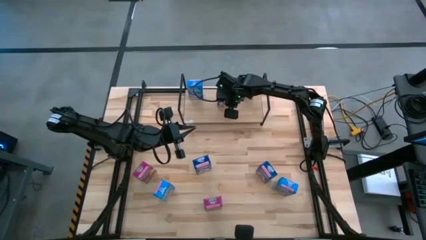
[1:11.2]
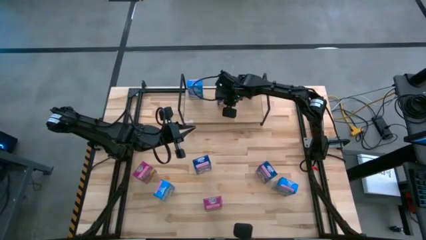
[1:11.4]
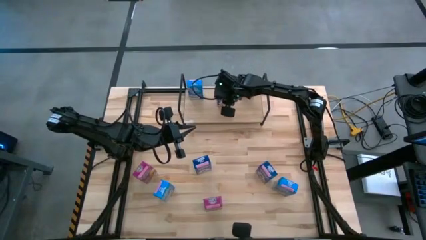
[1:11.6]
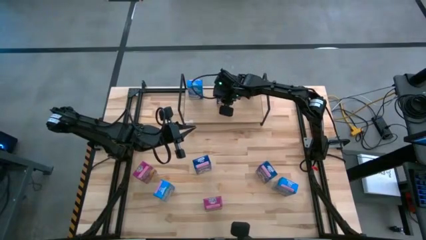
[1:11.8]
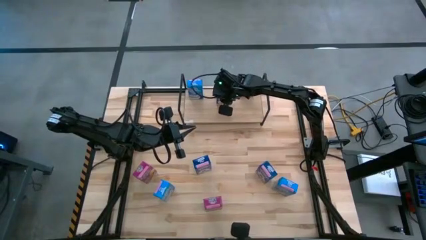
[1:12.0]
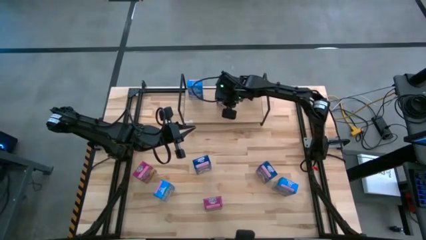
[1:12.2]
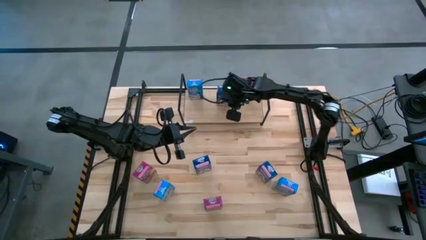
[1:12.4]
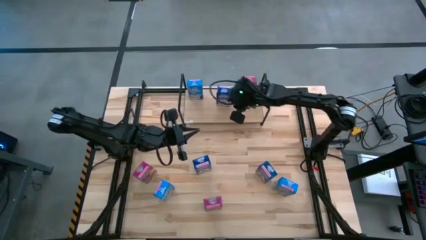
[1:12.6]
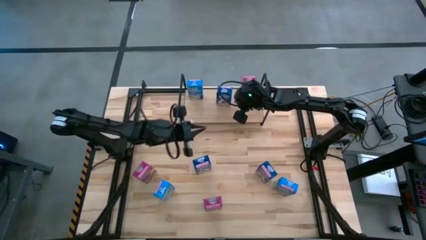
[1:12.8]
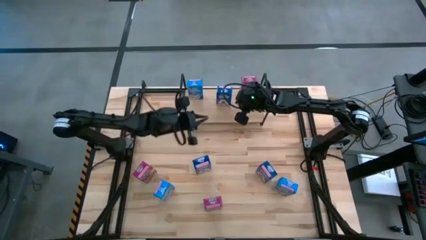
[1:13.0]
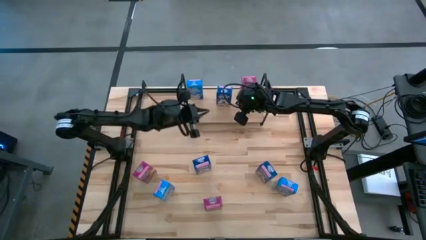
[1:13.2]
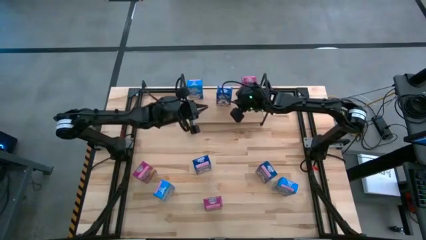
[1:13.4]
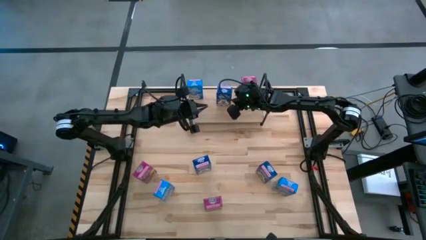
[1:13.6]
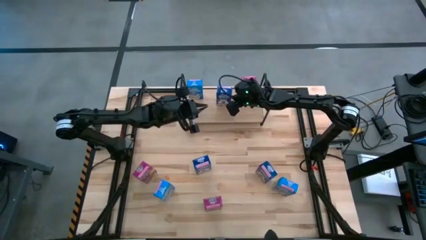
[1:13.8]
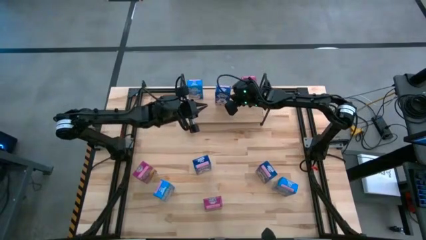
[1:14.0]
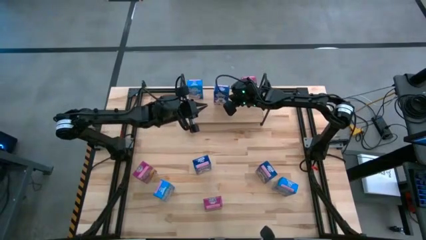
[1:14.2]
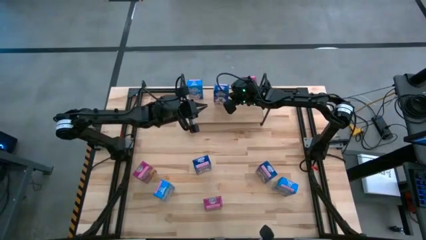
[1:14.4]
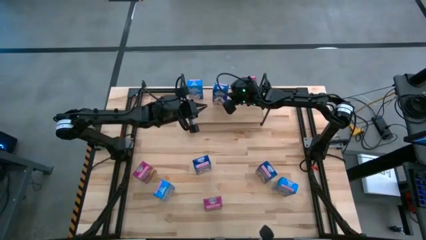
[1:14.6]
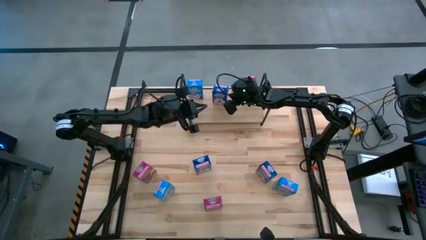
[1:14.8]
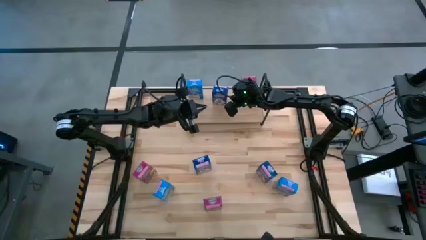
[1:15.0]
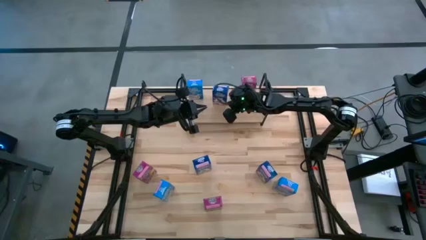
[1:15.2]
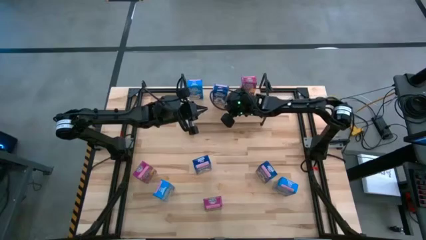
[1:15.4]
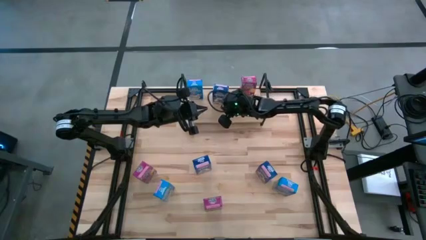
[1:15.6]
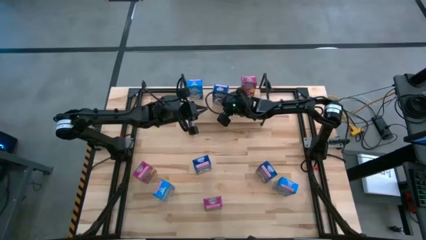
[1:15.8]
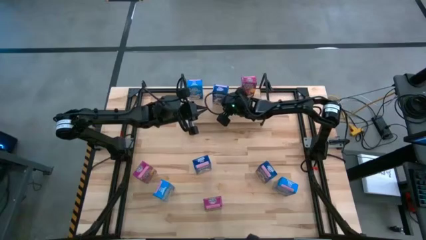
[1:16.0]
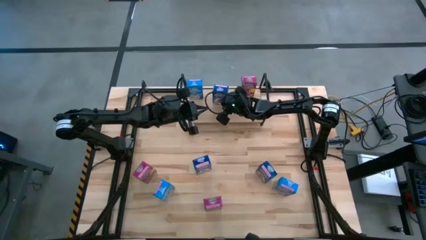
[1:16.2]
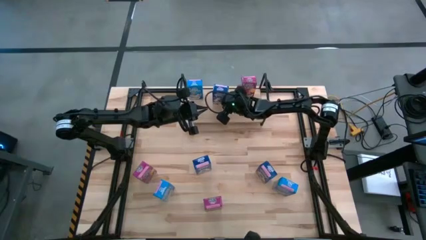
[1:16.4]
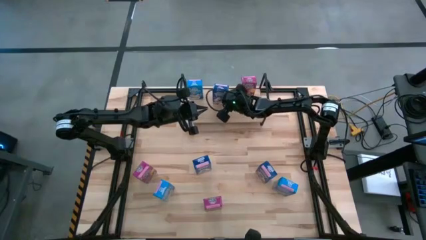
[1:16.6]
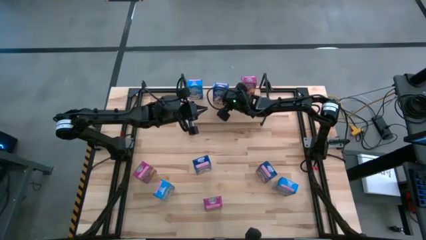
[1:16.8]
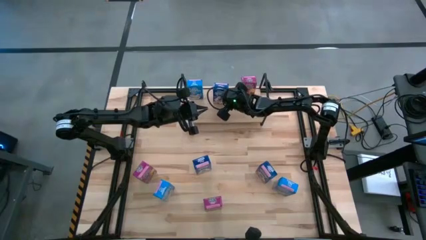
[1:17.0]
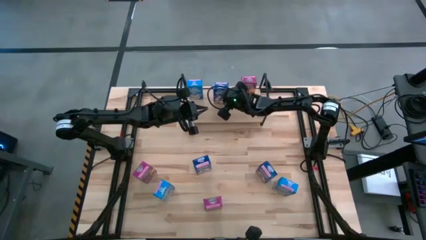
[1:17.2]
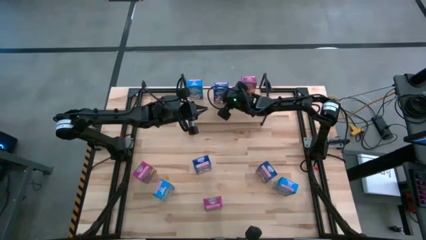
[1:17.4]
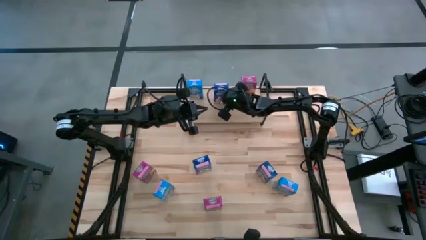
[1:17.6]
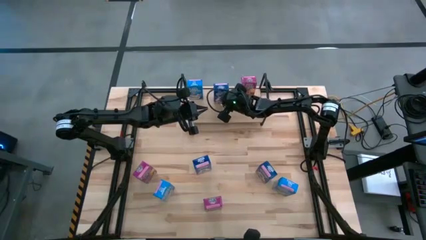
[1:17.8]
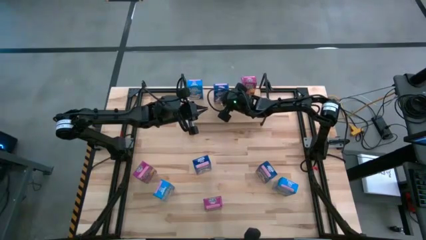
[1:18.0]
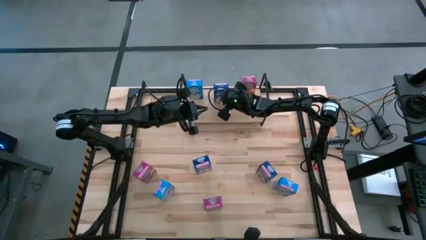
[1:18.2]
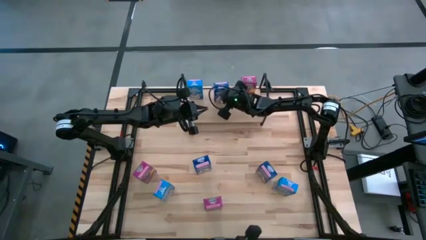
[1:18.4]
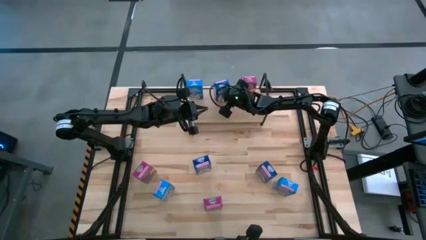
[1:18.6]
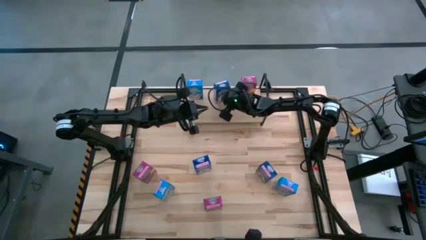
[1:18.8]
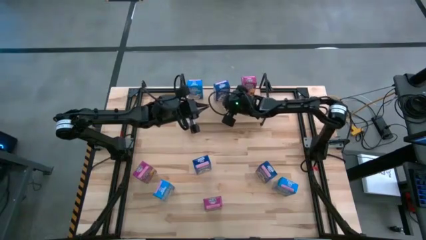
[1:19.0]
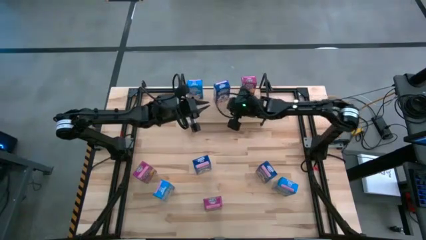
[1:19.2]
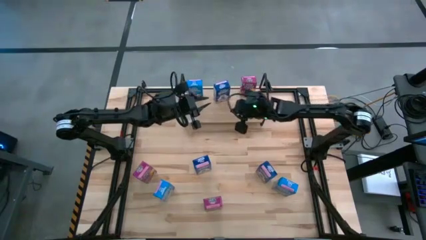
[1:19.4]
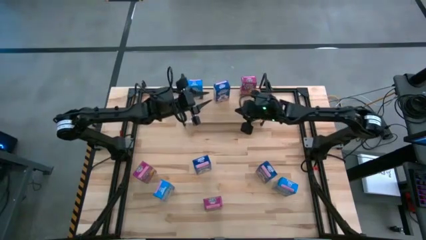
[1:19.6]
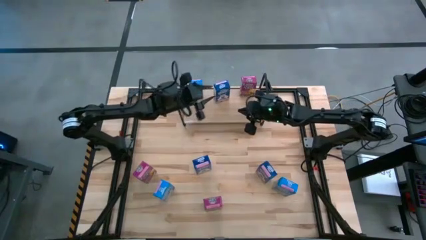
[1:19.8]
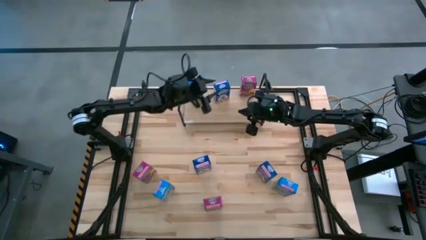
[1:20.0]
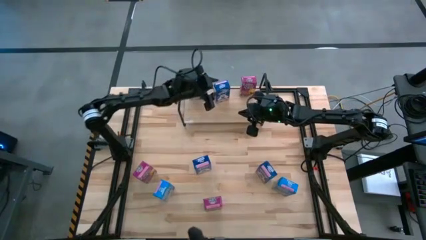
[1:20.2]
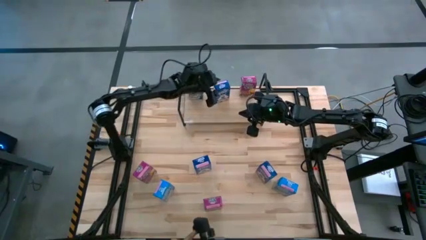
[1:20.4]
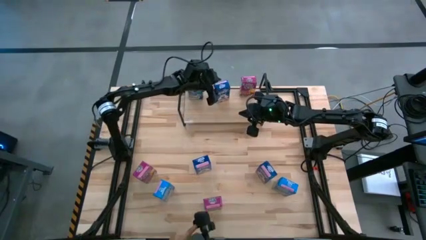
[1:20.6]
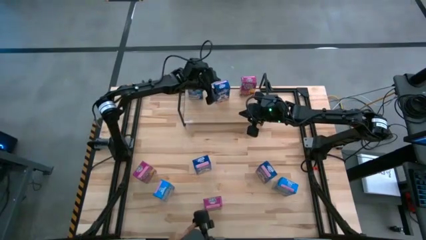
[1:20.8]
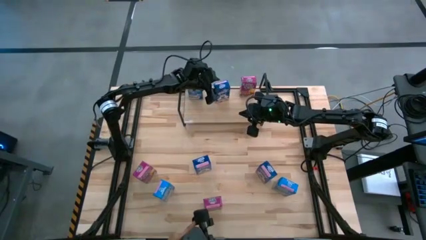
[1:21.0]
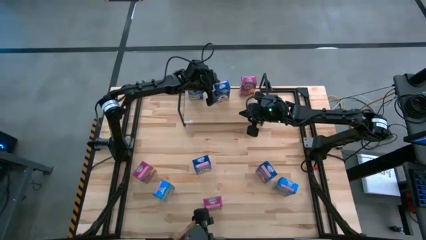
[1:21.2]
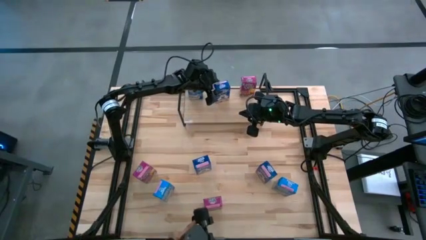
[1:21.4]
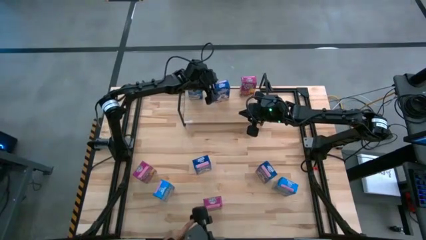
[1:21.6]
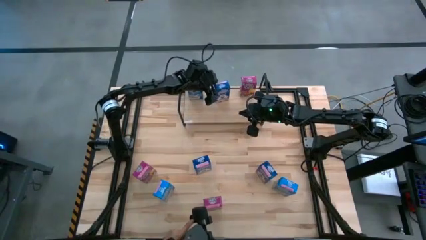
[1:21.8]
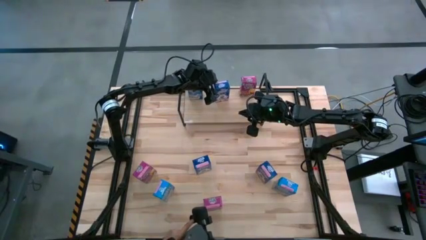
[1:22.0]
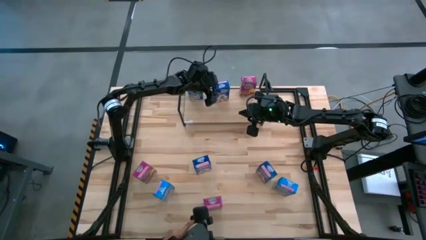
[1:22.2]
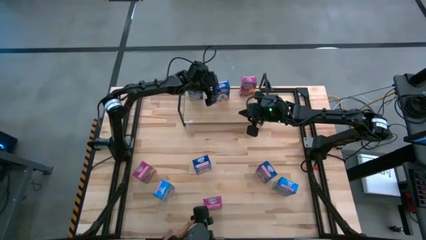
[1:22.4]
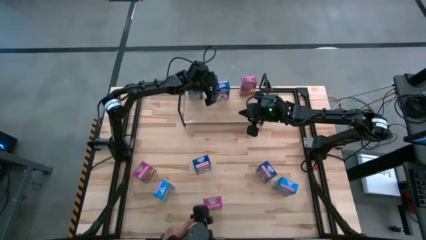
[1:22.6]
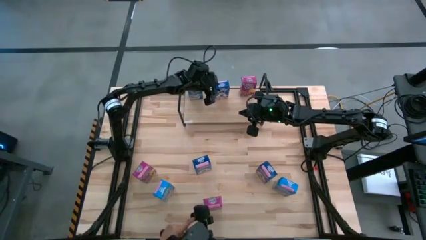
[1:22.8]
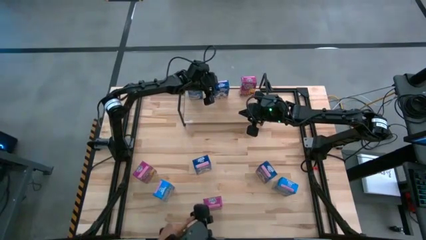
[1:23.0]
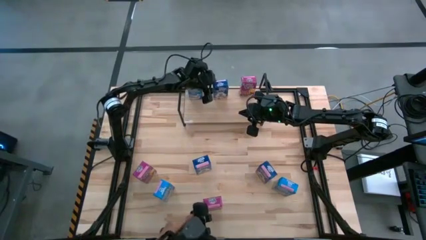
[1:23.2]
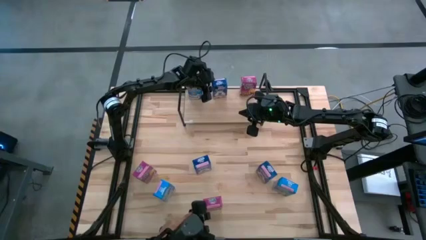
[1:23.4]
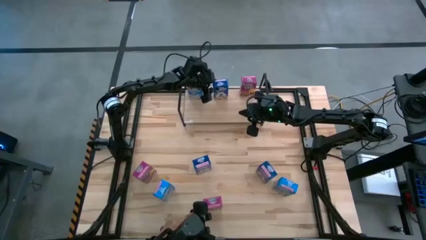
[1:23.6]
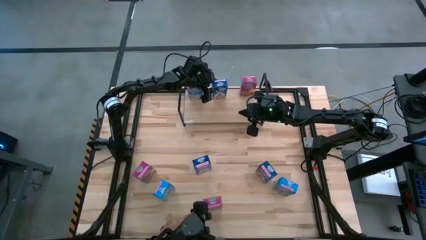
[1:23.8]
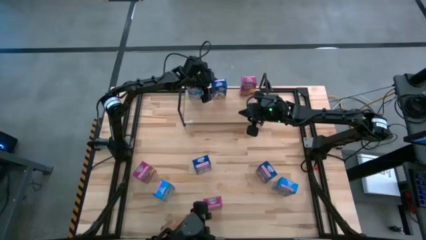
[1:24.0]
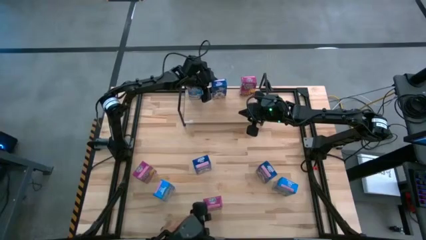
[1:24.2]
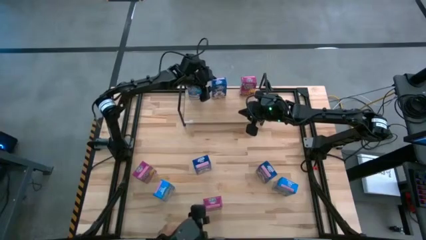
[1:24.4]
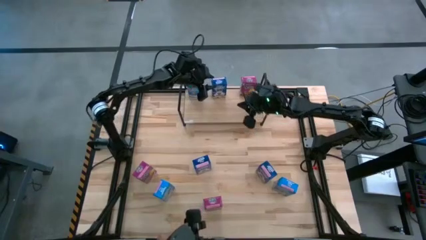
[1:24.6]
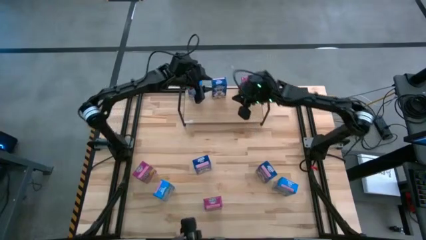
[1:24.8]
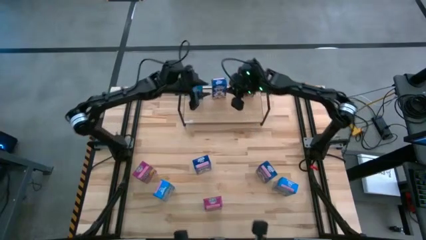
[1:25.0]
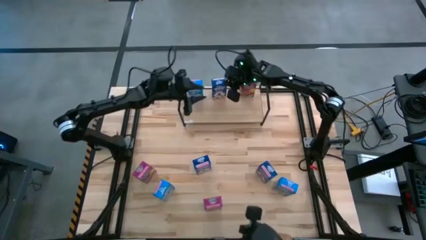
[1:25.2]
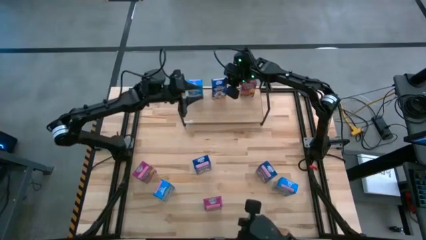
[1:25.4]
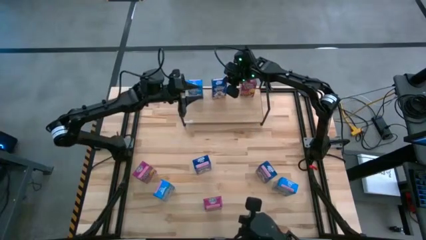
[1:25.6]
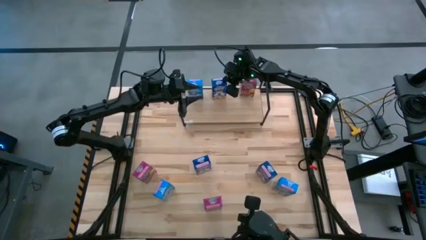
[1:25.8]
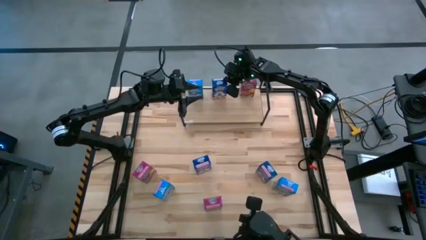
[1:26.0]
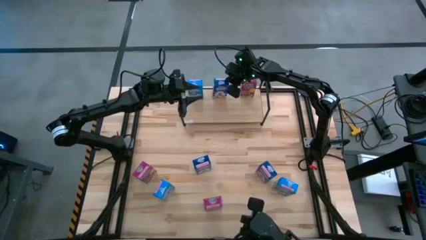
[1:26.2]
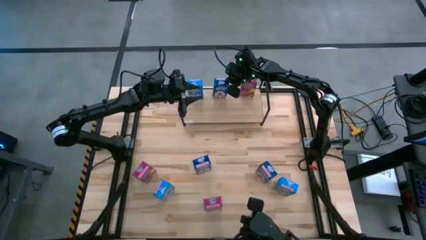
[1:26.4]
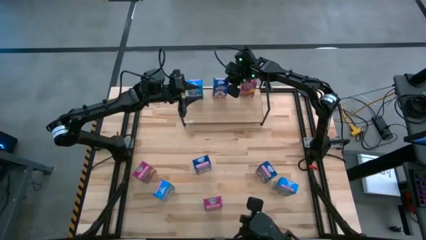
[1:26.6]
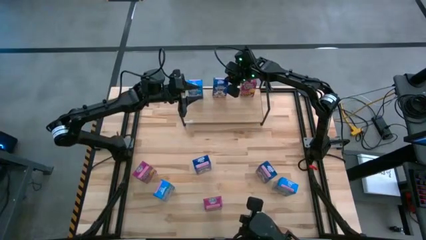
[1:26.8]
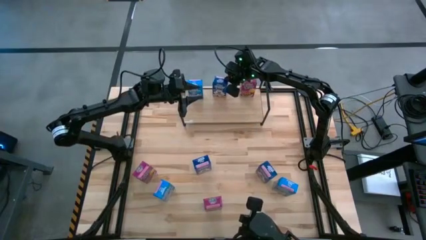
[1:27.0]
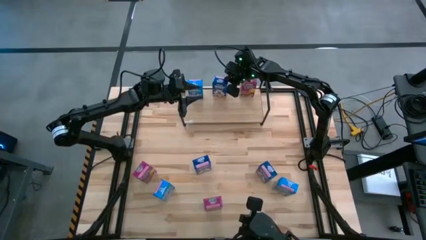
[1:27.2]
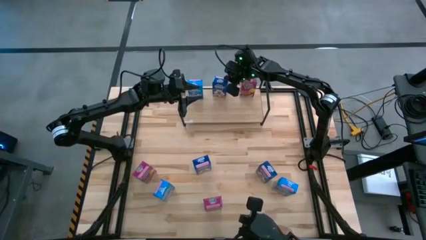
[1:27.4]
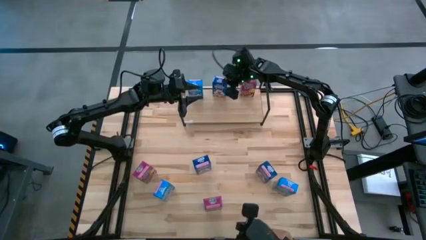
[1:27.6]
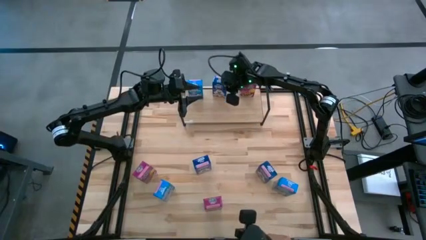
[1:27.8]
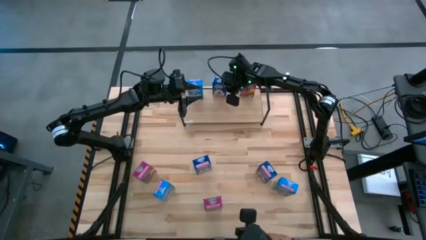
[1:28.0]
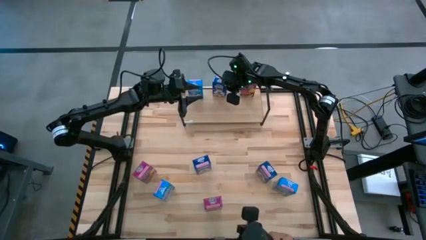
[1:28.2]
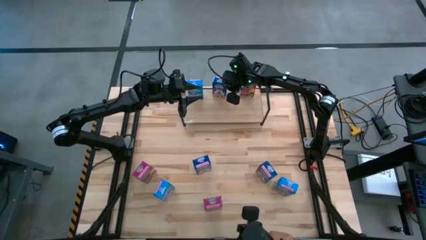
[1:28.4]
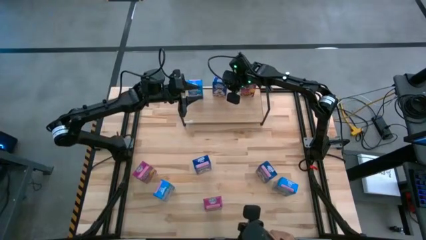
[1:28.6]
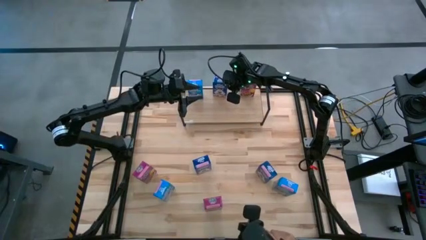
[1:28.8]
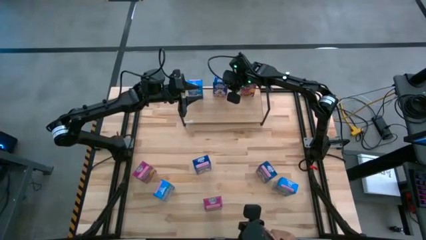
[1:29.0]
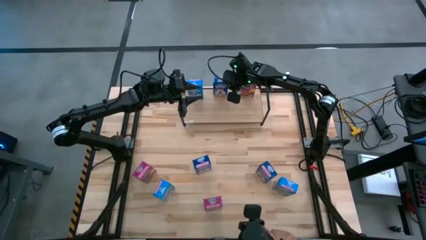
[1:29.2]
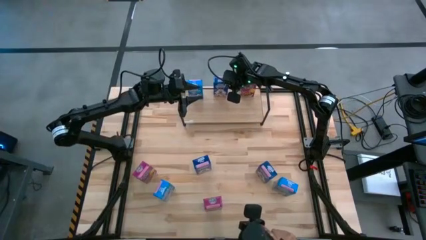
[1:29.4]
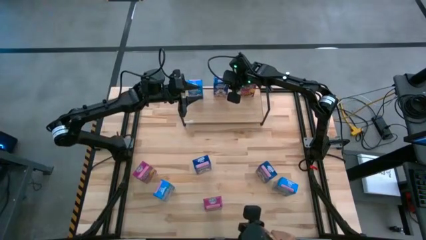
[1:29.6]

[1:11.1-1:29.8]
Task: Stack cereal on shelf
Put the top dark blue cereal box on the shelf Adjust the dark blue cereal box
